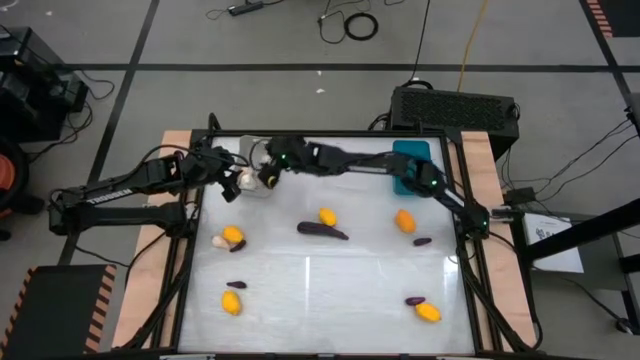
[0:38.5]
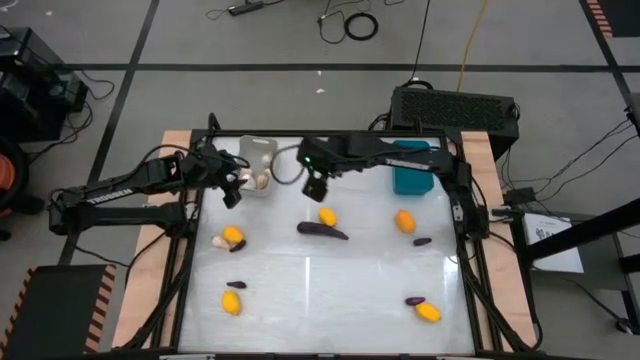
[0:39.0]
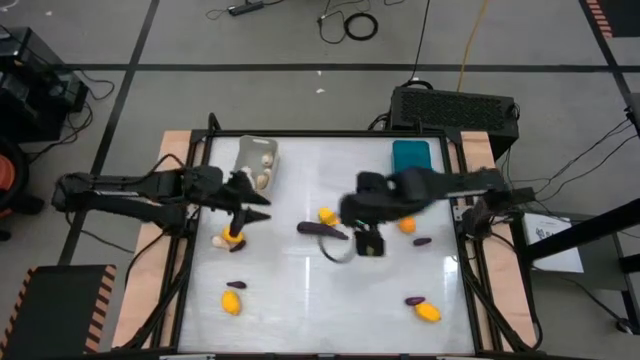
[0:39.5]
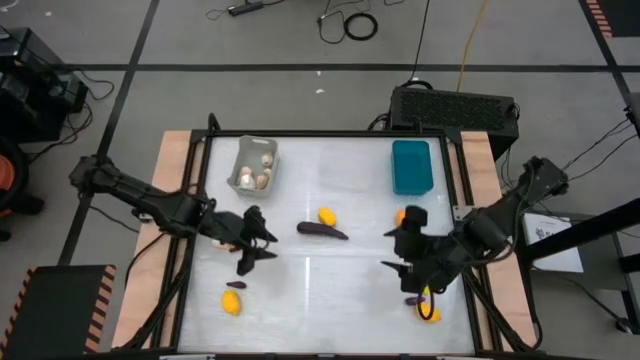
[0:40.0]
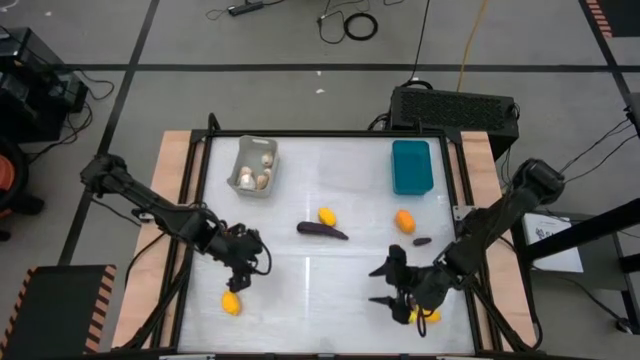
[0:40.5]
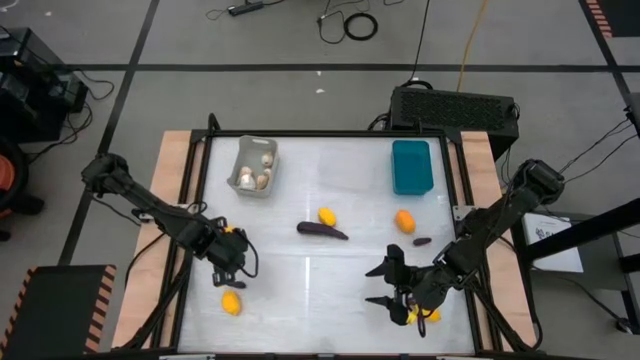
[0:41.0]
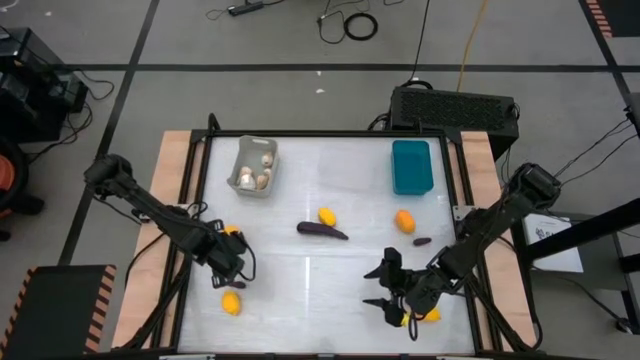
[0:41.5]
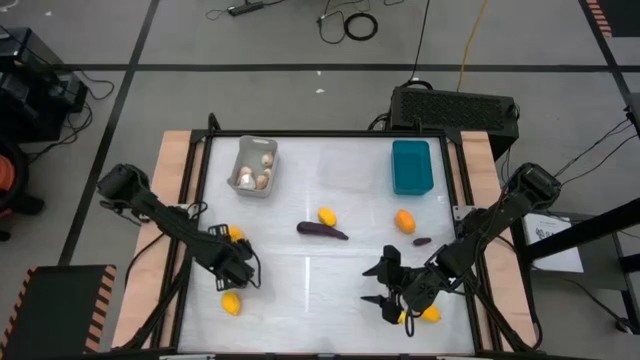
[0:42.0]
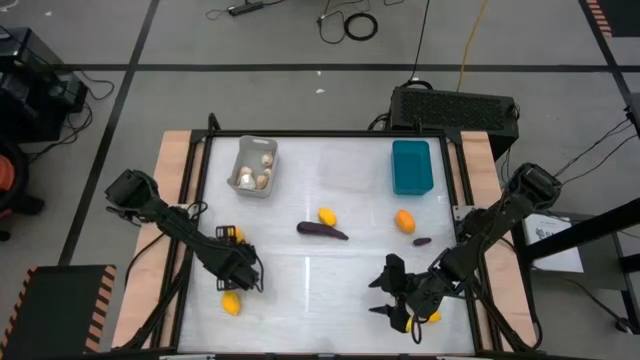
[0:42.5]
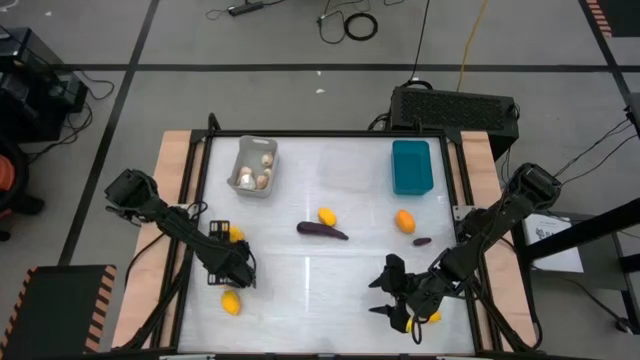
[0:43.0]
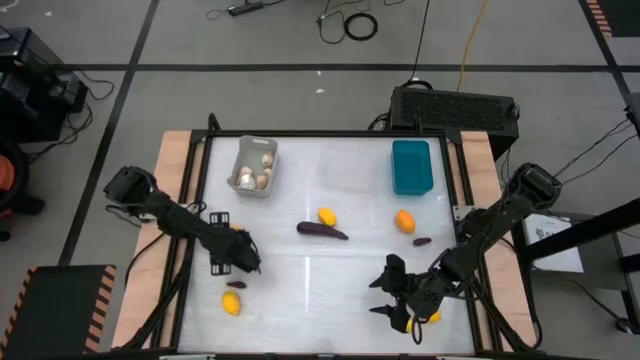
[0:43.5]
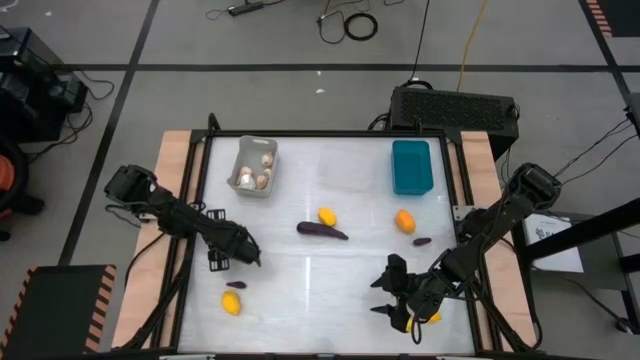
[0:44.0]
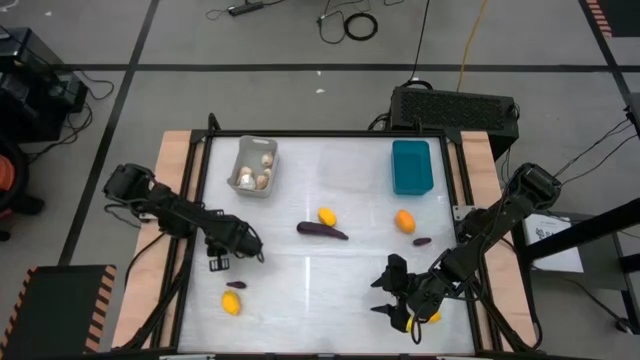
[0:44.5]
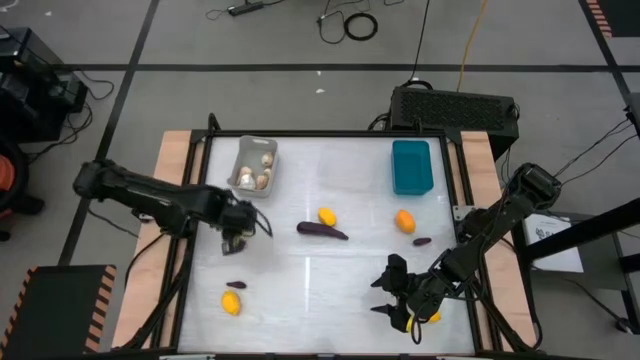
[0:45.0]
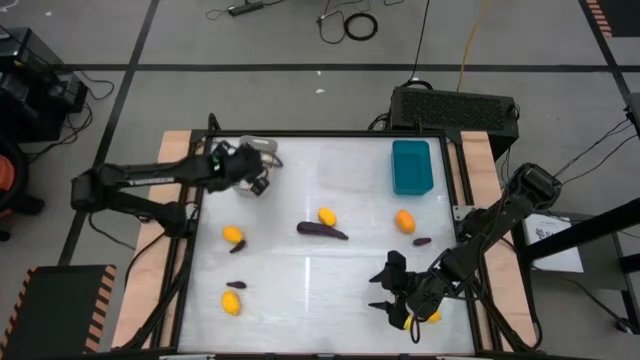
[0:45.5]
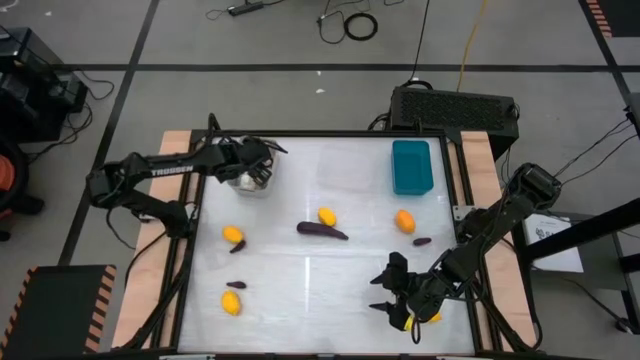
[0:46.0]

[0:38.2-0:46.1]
Task: Sort produce into baskets
Put the garlic into the gray bin

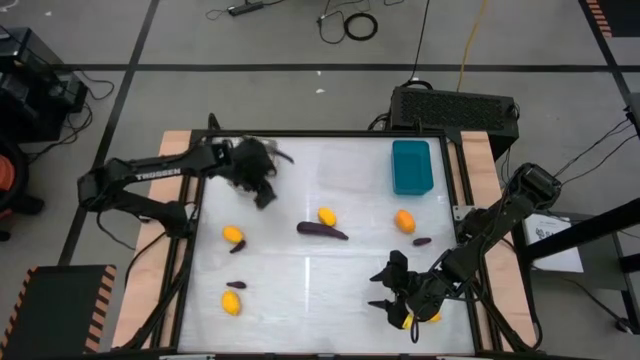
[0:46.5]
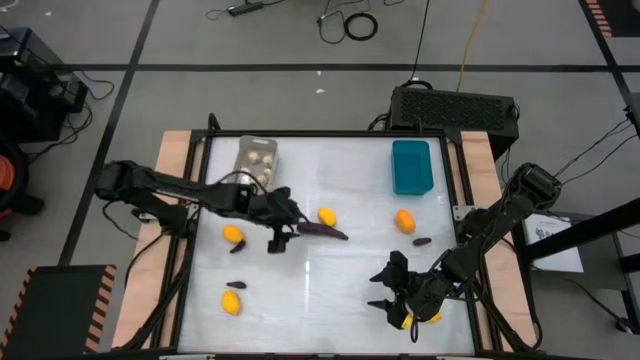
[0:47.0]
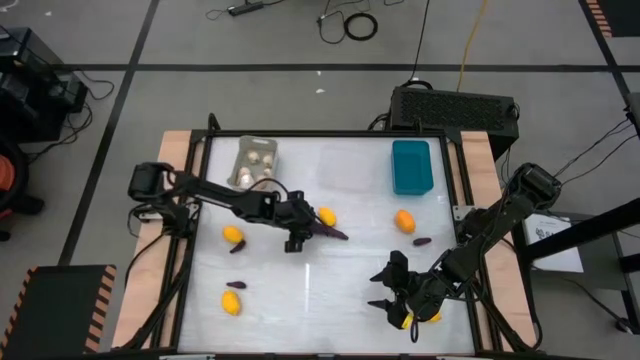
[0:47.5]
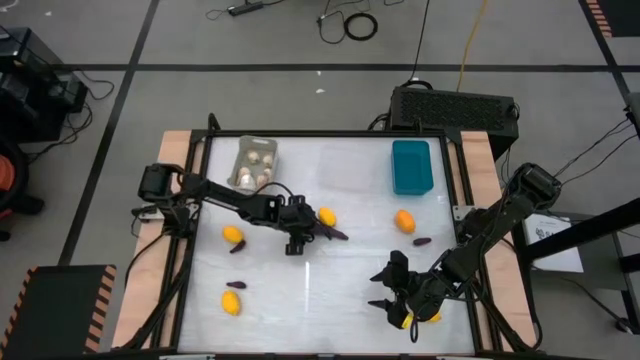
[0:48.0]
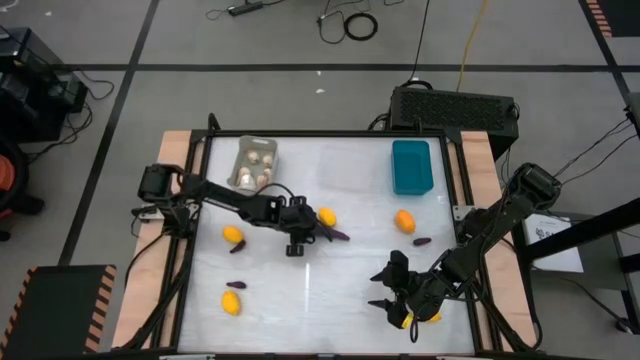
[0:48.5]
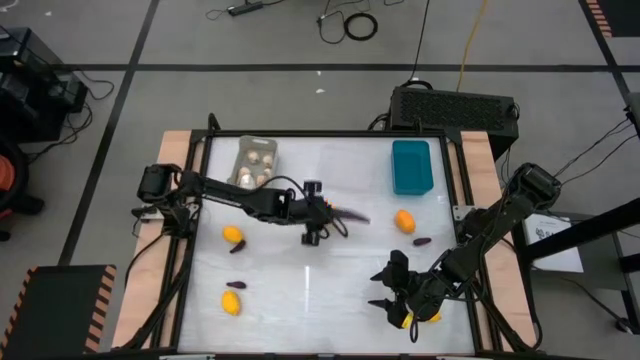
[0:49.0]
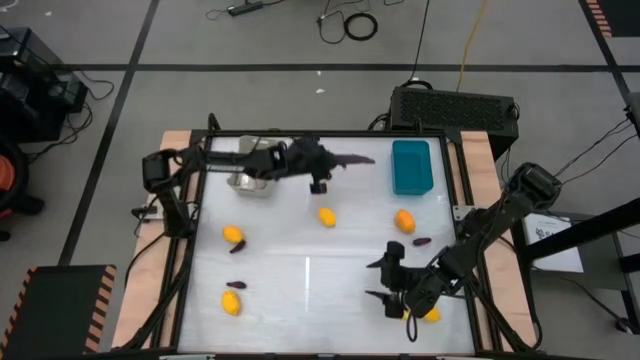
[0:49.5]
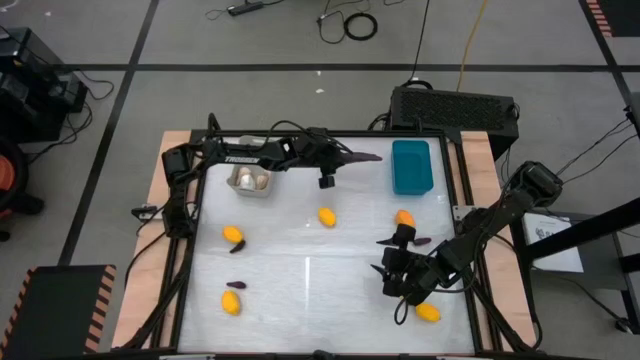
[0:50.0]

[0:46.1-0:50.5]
Put the eggplant into the transparent bin

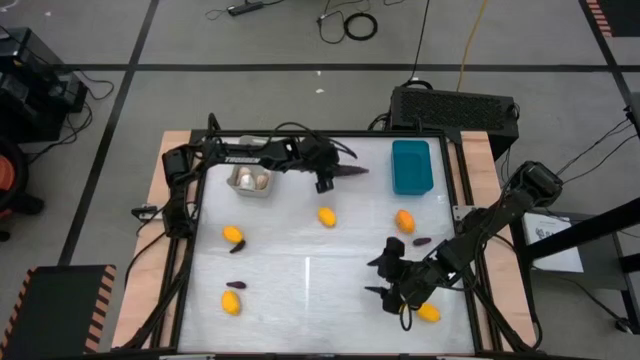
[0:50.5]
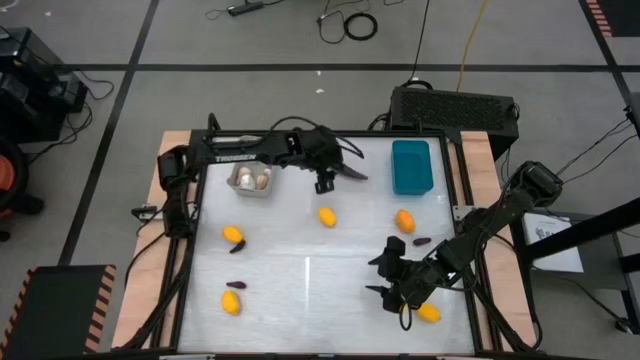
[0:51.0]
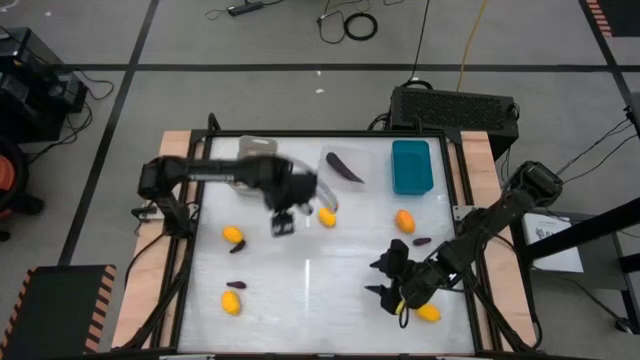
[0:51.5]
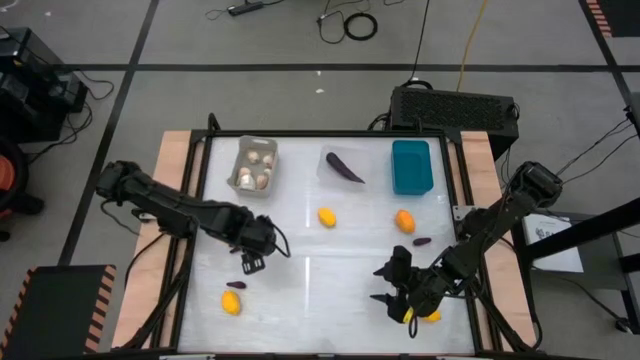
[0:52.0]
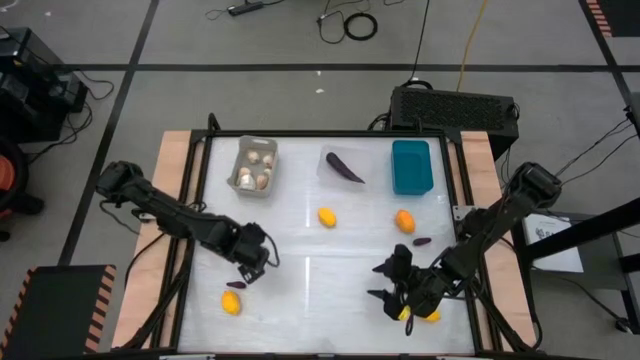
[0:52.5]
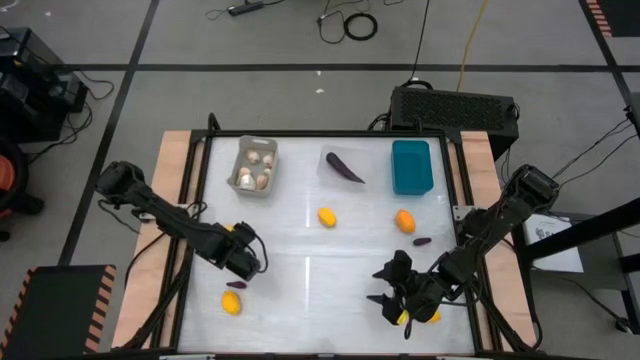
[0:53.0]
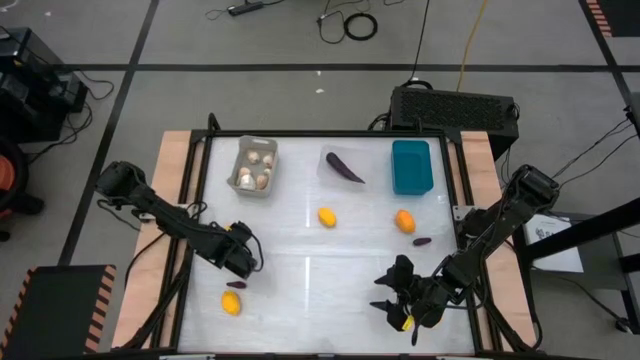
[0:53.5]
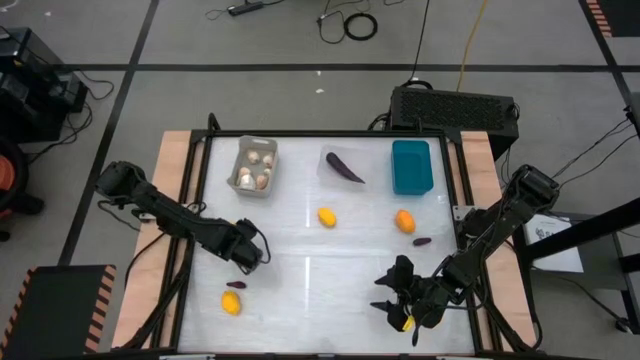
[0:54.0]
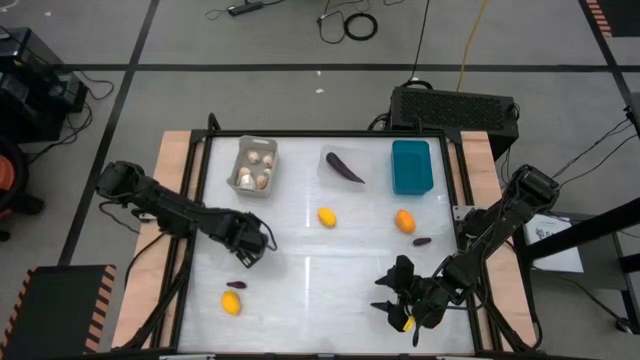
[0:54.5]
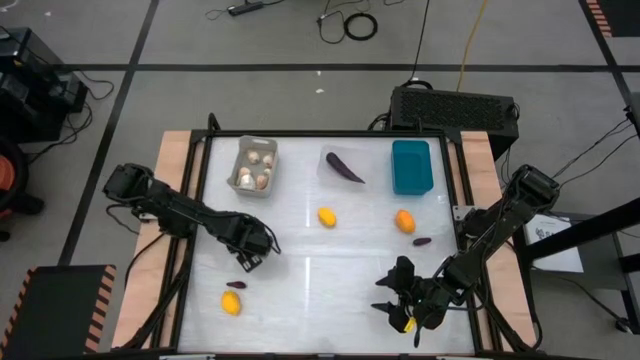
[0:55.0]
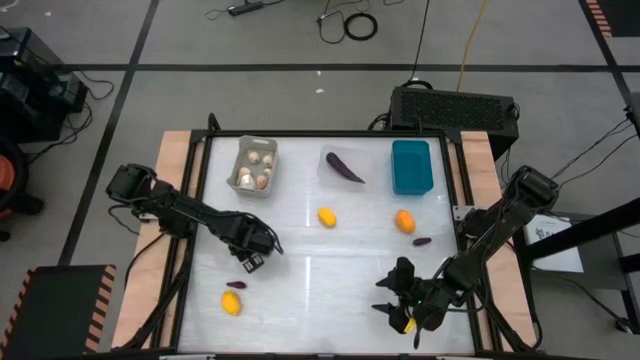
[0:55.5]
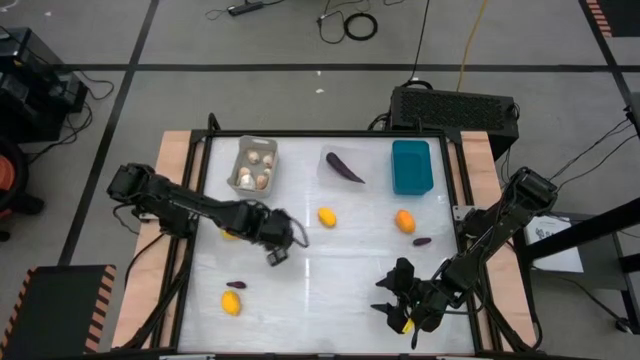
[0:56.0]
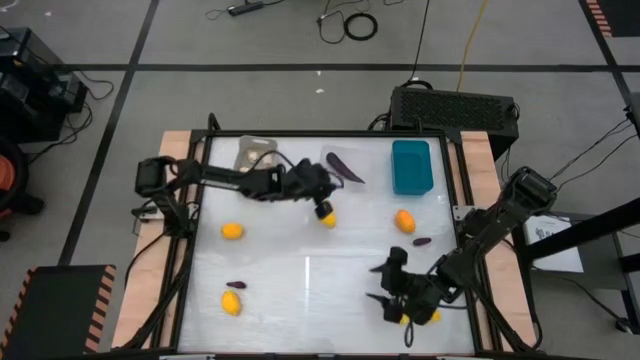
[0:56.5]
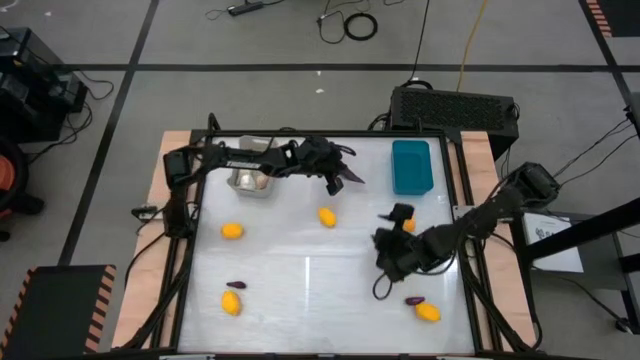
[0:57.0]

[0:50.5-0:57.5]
Put the eggplant into the transparent bin

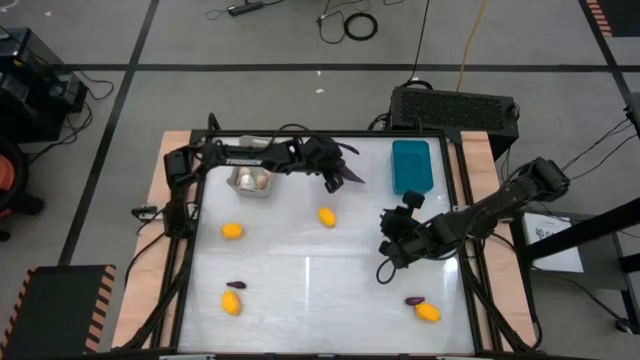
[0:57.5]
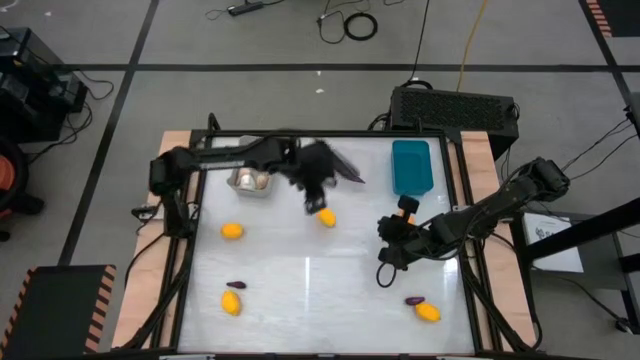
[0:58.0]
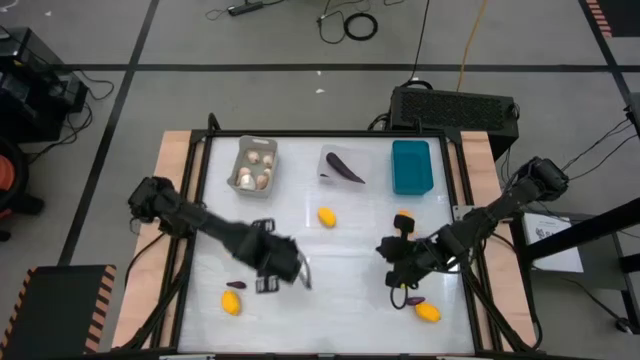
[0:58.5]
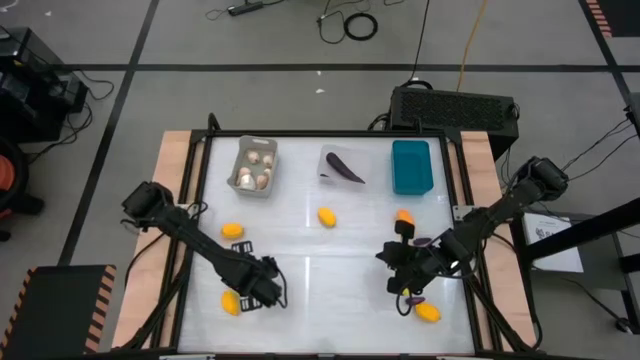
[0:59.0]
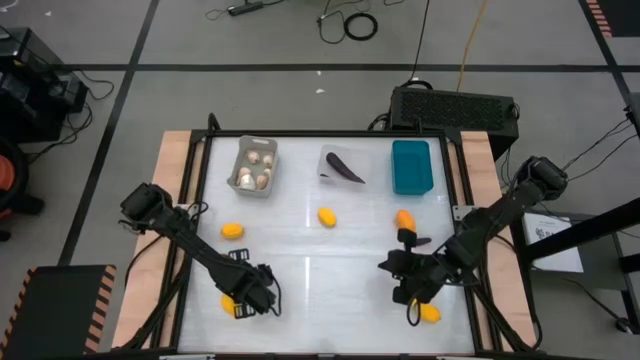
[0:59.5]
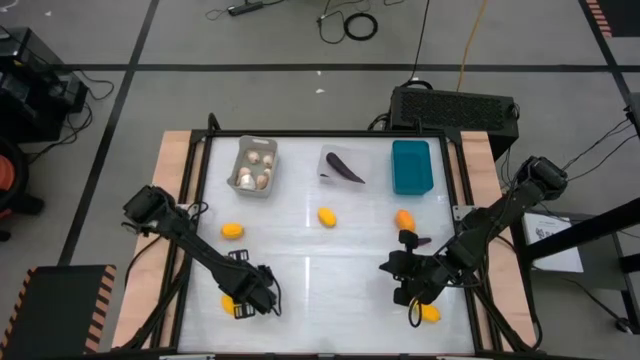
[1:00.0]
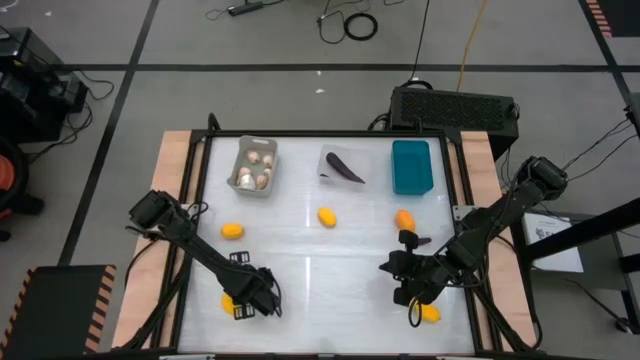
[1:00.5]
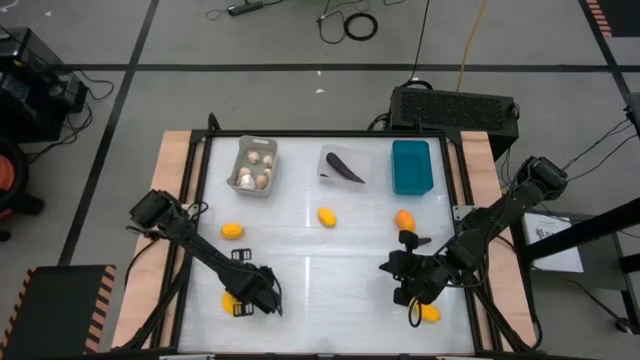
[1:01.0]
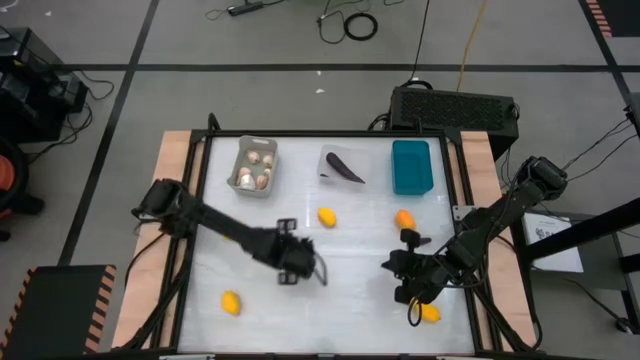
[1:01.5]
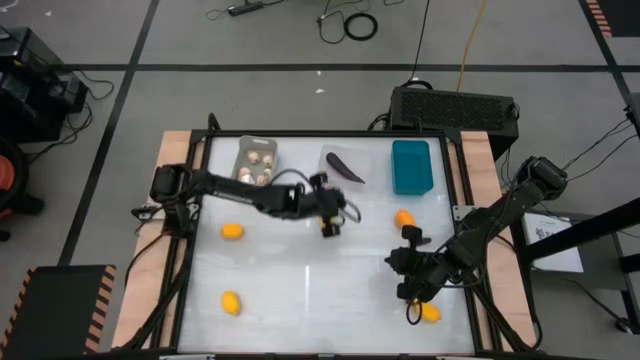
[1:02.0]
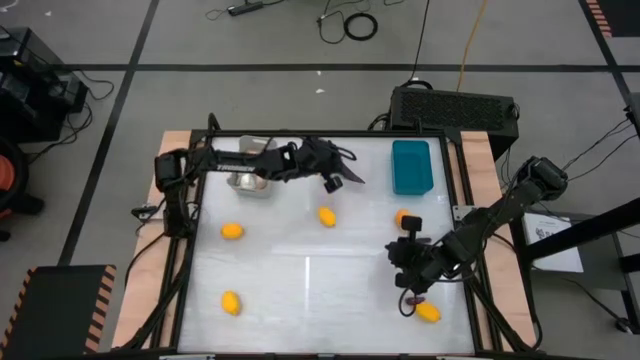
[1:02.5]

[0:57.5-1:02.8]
Put the eggplant into the transparent bin
